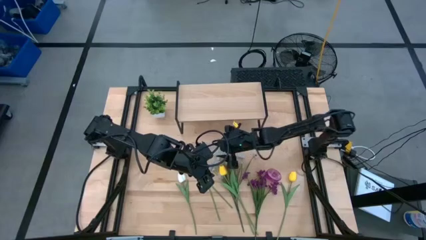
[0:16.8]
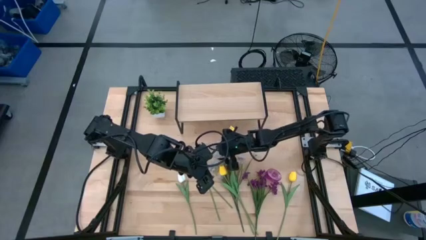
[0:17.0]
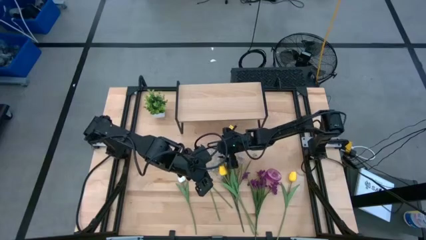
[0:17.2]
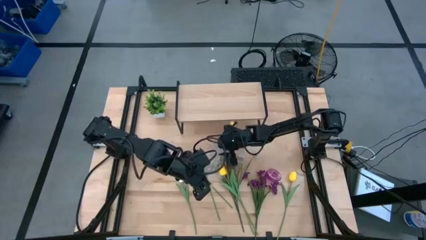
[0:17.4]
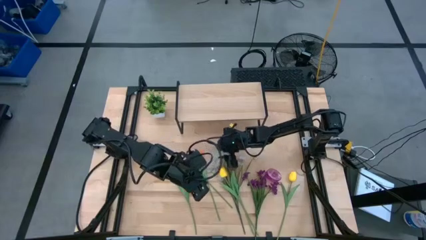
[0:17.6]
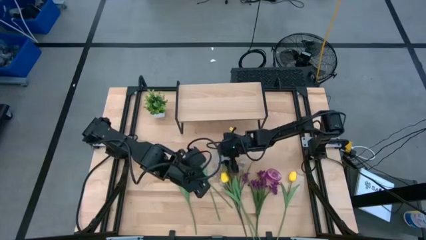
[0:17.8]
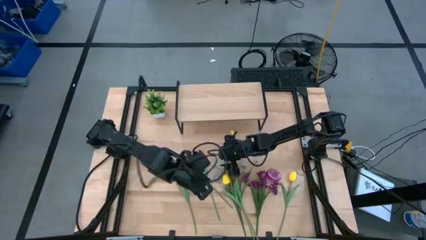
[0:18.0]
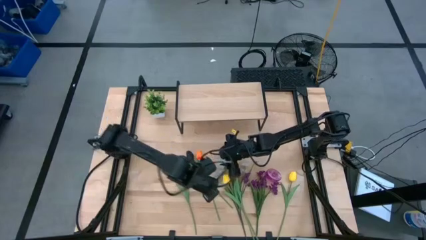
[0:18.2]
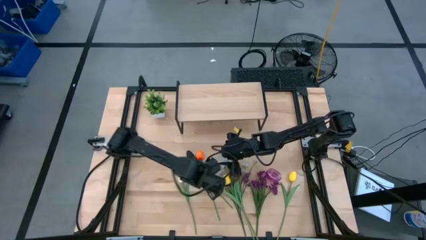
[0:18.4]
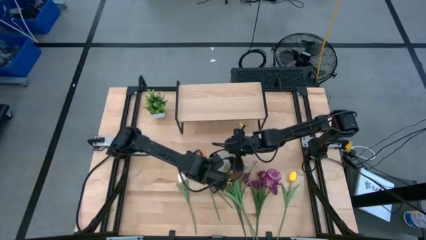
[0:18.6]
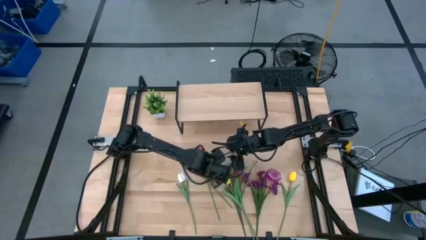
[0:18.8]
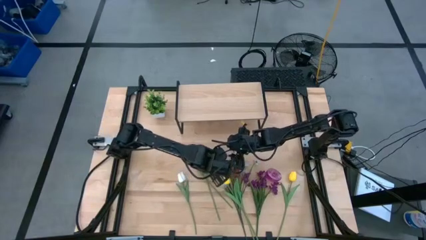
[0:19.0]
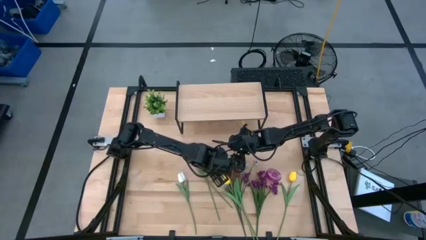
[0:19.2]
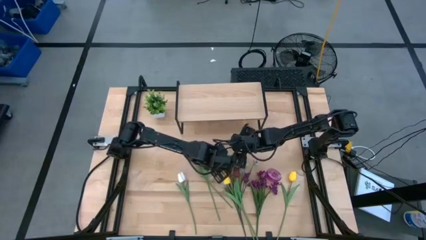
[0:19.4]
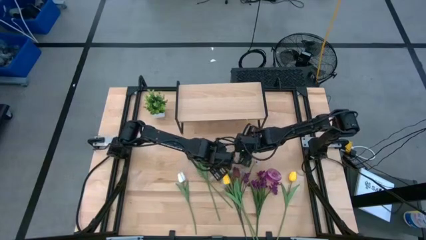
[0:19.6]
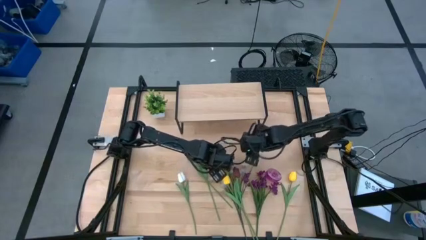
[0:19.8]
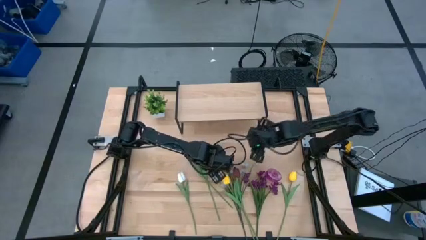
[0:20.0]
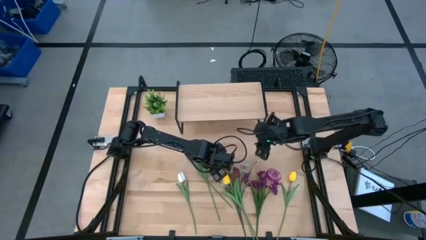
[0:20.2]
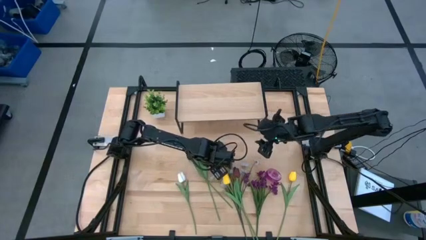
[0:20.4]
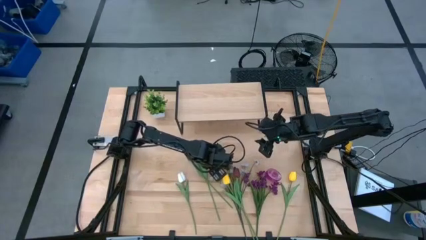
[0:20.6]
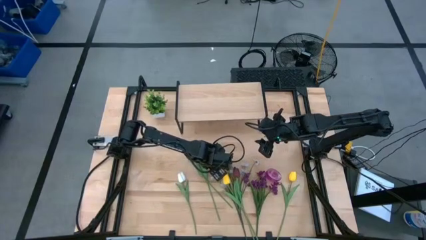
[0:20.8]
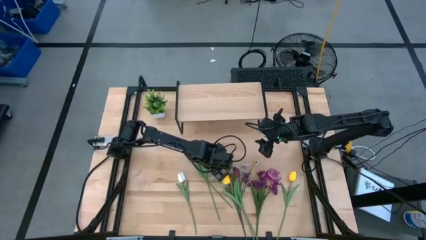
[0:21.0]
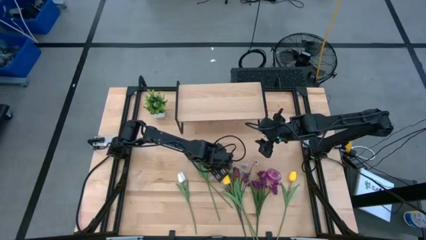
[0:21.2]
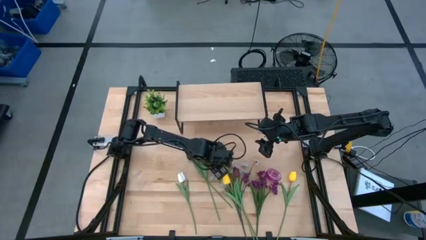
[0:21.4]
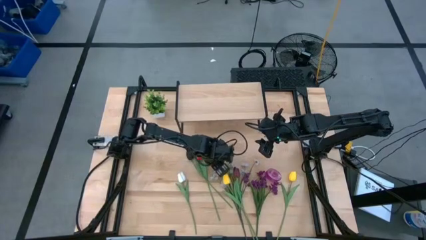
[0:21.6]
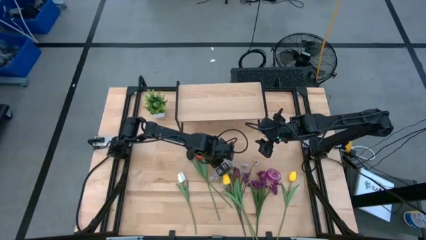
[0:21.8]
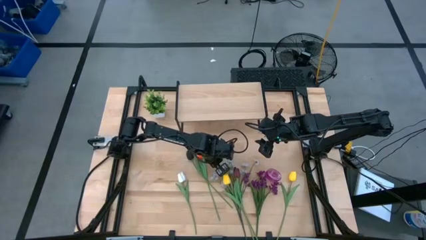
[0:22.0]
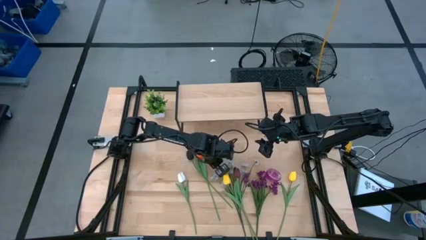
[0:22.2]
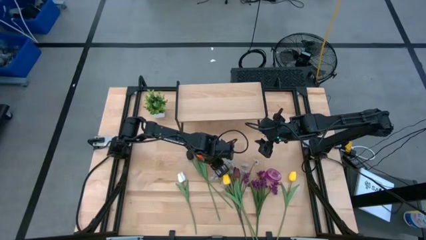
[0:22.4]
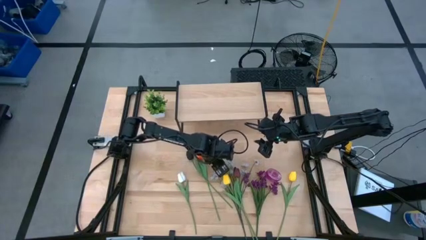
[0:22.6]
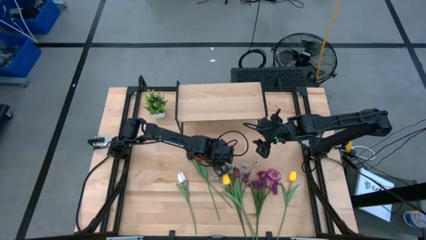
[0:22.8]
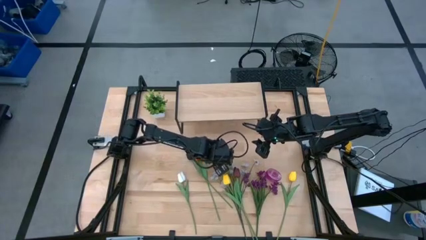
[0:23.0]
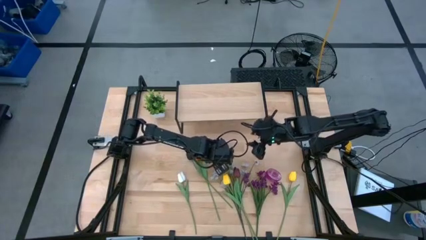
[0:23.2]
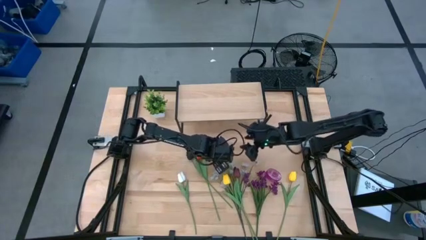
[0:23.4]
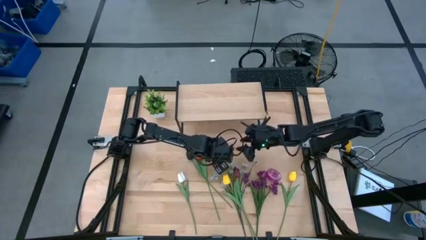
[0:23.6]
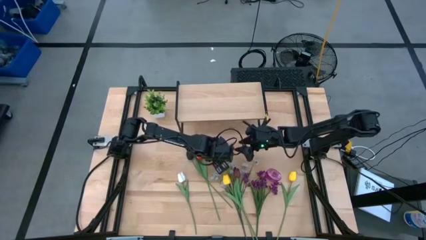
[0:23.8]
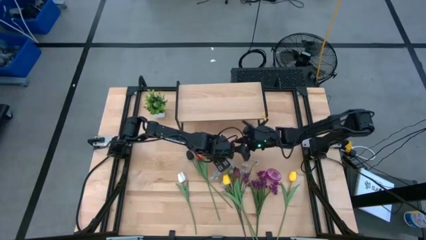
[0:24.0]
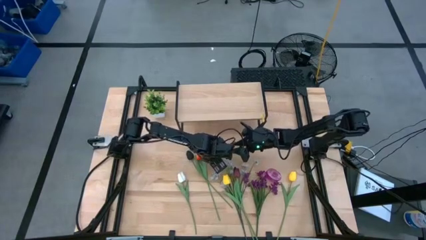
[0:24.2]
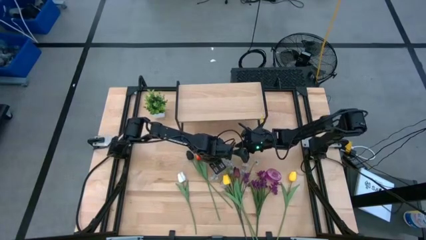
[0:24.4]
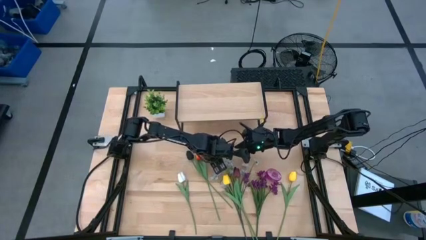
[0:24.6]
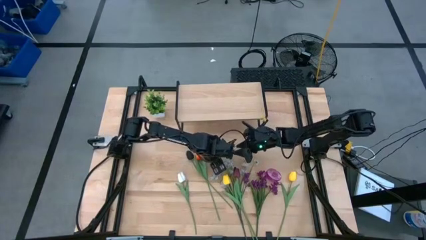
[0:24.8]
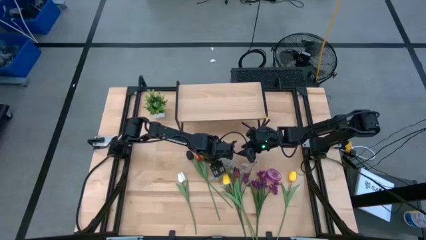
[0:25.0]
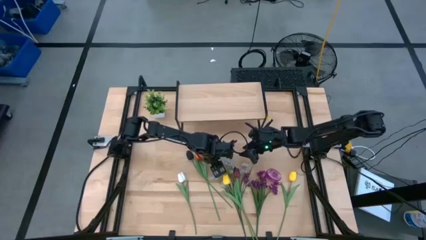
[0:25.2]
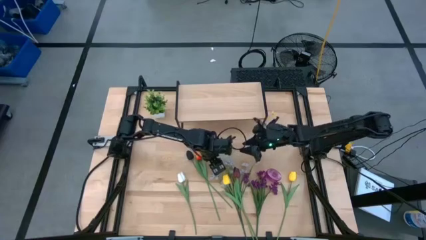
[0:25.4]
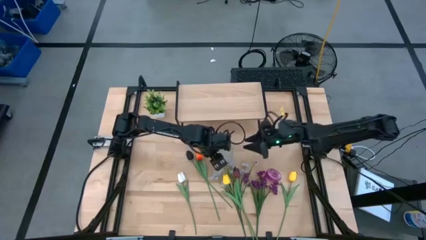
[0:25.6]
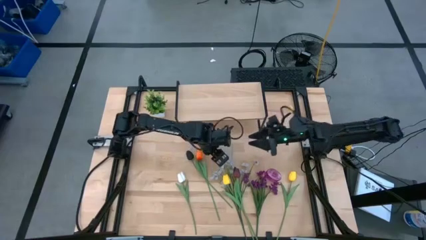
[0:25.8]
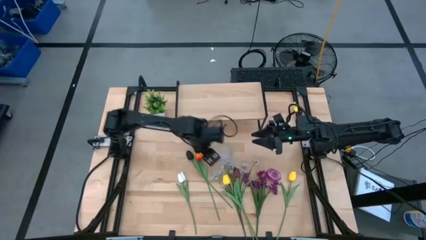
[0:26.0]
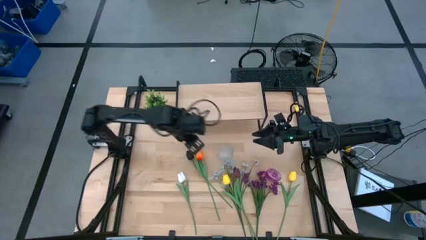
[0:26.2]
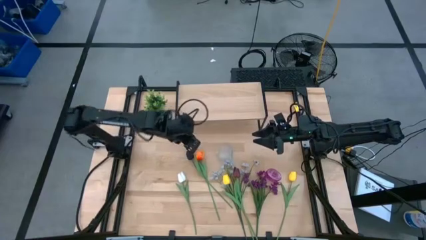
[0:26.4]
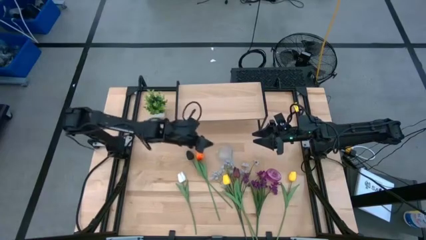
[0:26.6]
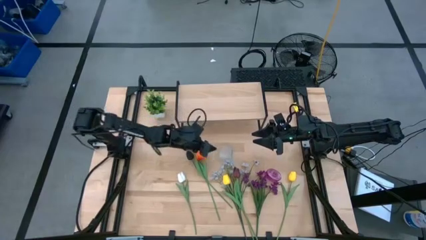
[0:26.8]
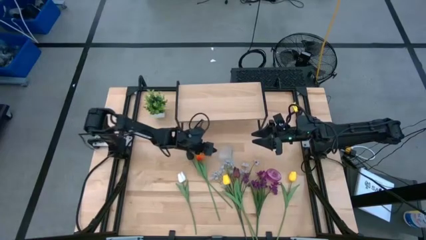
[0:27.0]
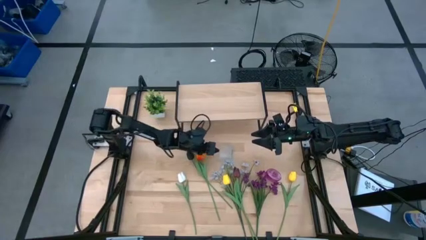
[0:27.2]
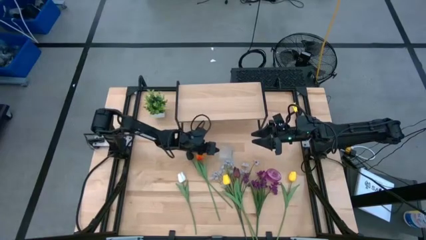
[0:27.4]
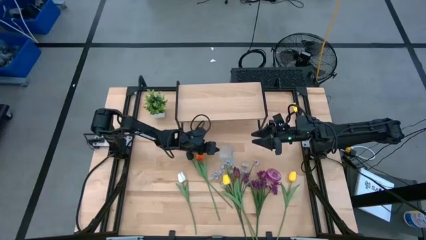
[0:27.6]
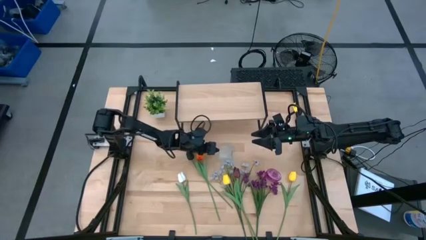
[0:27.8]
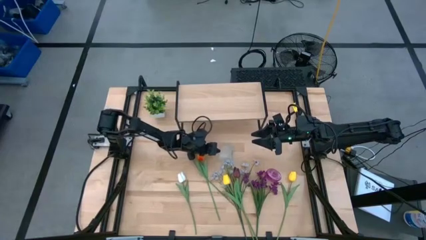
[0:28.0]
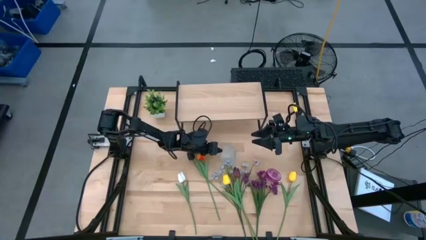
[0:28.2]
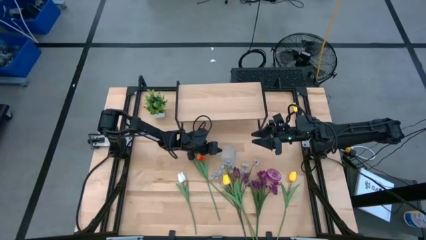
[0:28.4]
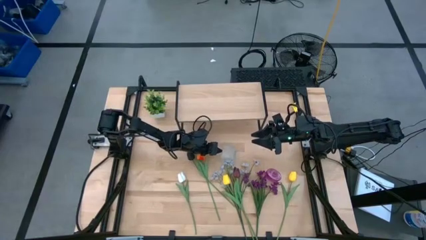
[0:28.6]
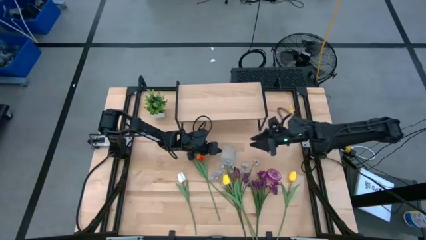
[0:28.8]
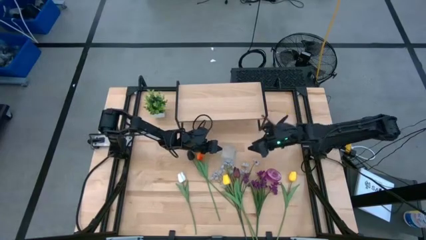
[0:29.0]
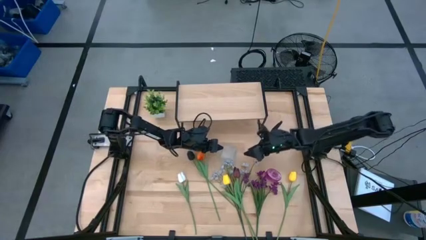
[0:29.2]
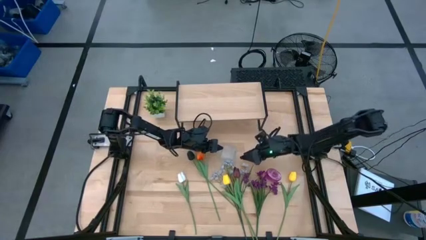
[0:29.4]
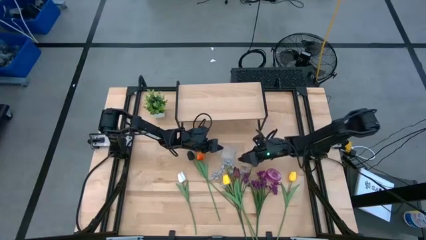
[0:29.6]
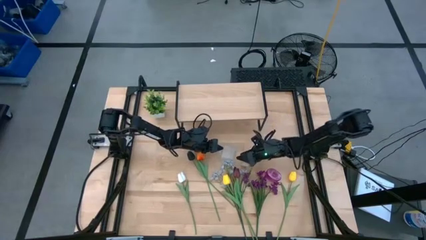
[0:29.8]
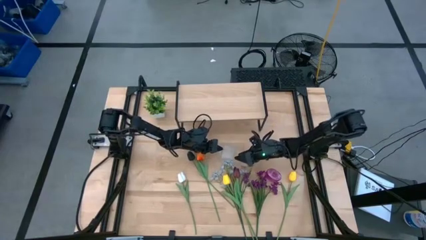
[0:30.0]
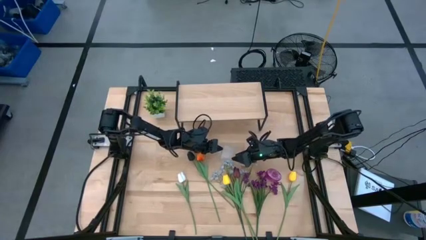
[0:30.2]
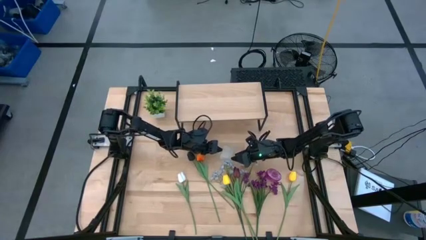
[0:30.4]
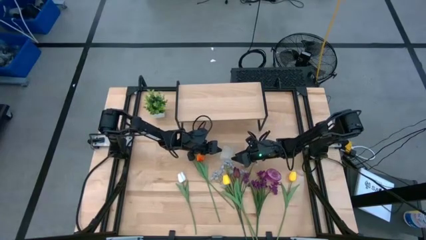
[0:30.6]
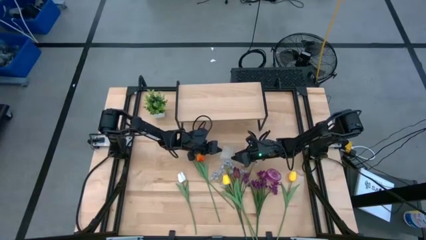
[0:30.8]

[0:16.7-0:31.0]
Task: Pick and place flowers into a vace then onto a shelf
Put the white vase on the shelf
